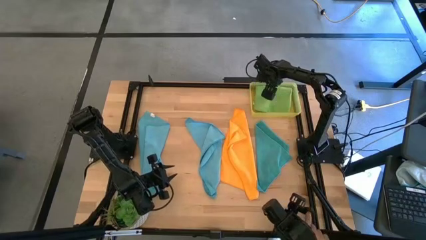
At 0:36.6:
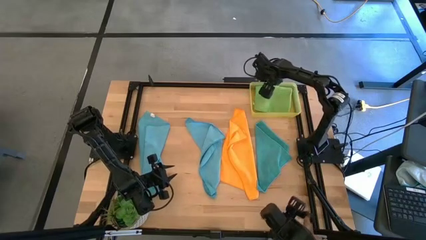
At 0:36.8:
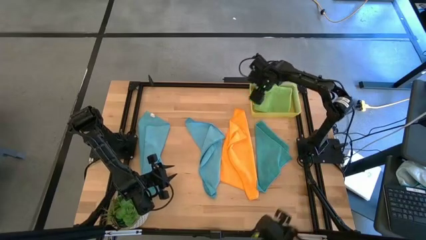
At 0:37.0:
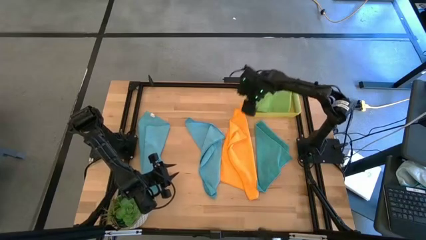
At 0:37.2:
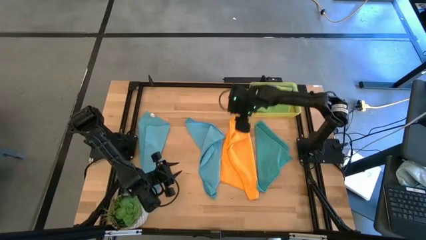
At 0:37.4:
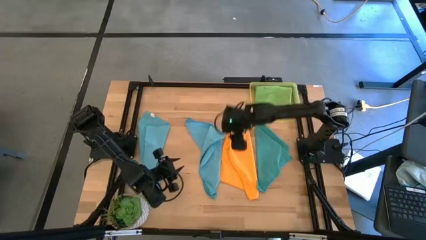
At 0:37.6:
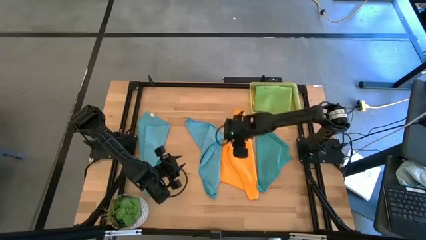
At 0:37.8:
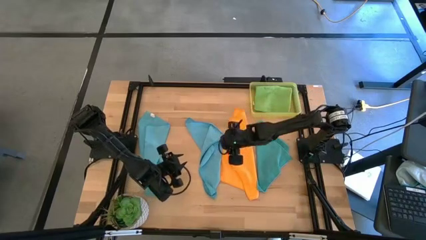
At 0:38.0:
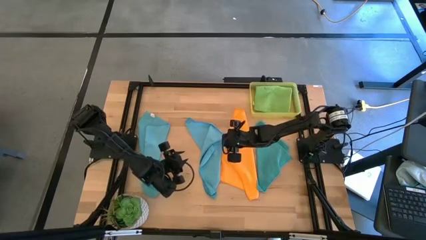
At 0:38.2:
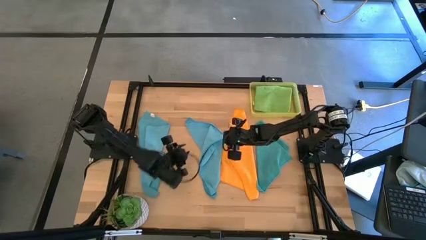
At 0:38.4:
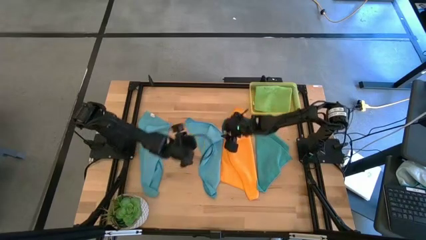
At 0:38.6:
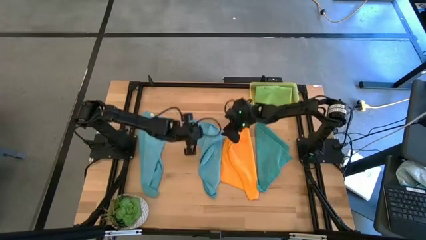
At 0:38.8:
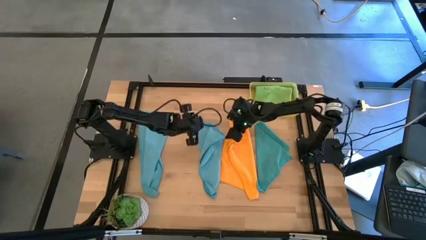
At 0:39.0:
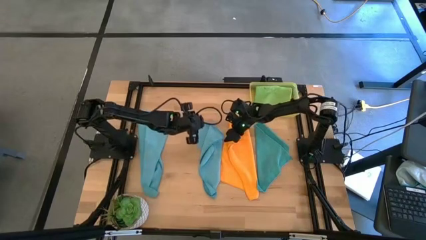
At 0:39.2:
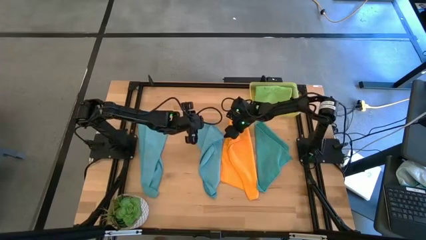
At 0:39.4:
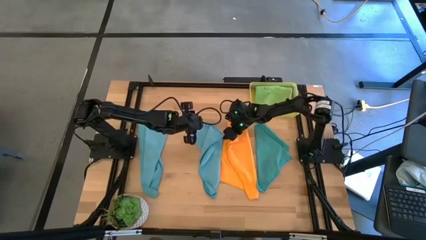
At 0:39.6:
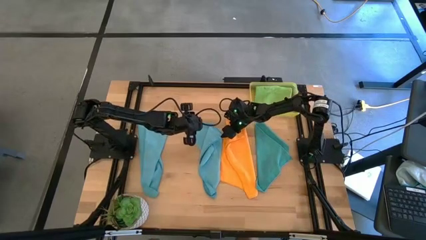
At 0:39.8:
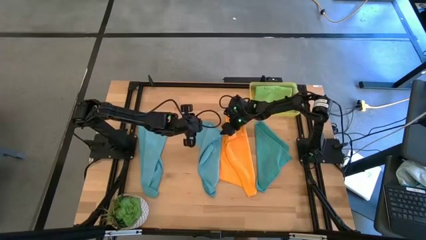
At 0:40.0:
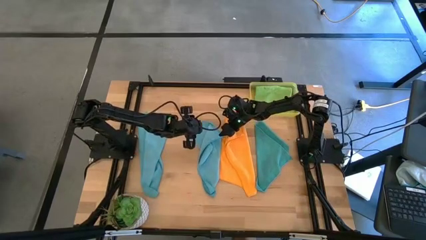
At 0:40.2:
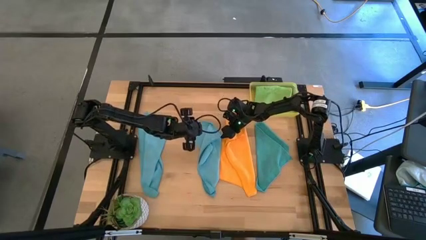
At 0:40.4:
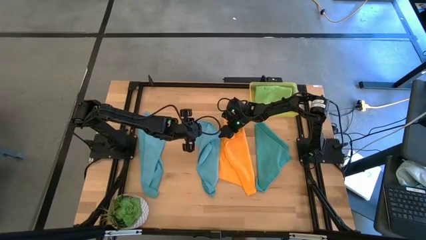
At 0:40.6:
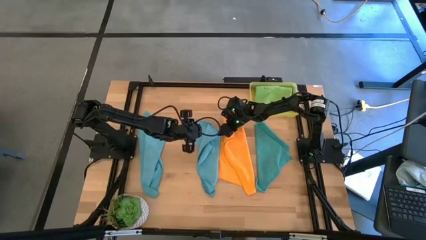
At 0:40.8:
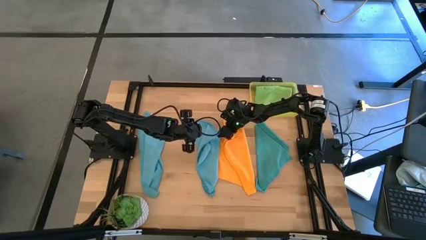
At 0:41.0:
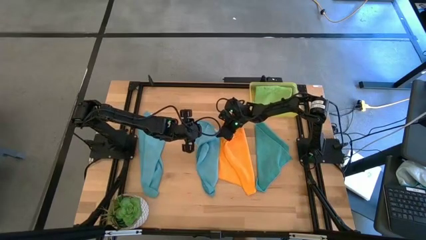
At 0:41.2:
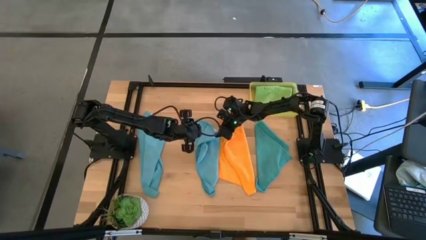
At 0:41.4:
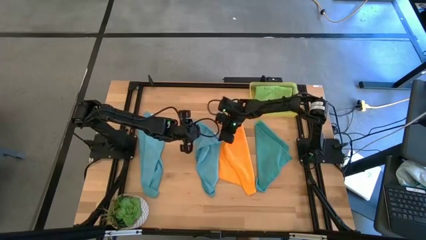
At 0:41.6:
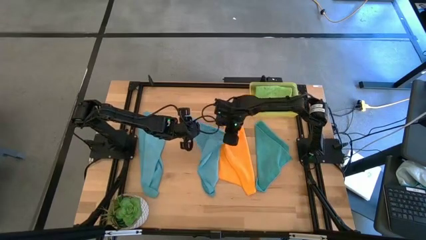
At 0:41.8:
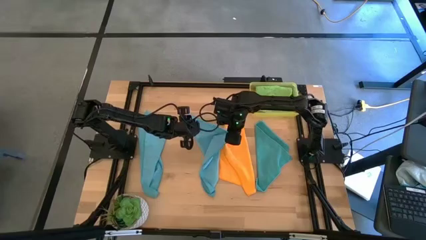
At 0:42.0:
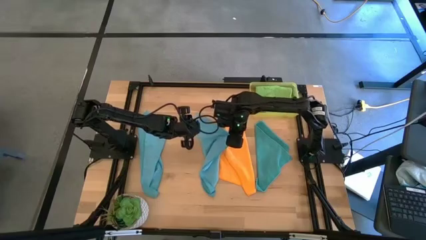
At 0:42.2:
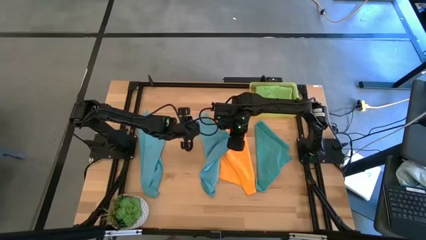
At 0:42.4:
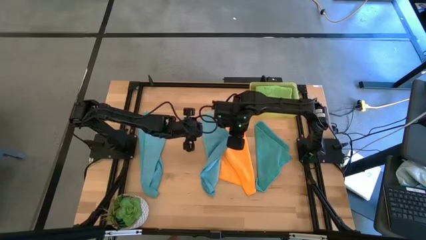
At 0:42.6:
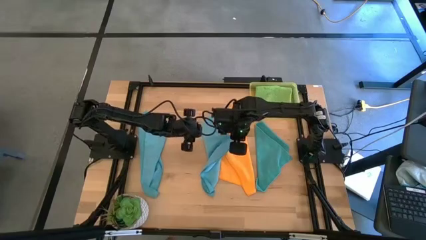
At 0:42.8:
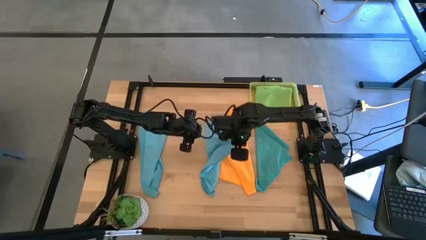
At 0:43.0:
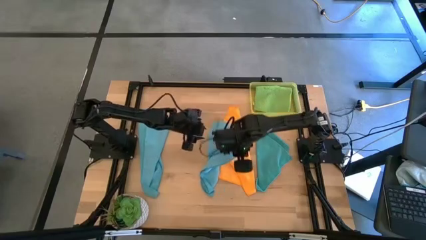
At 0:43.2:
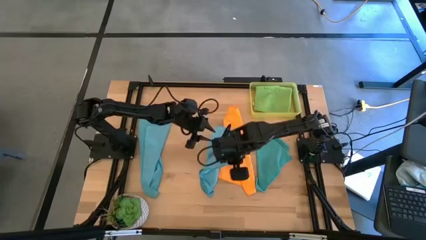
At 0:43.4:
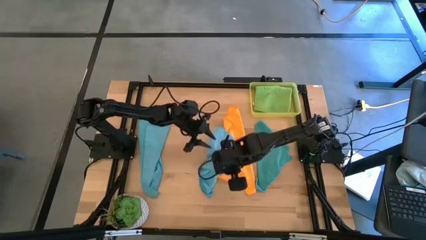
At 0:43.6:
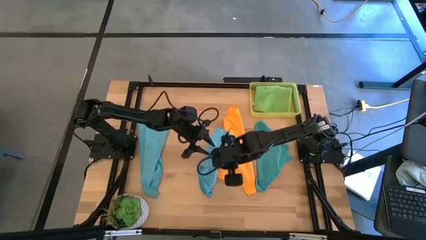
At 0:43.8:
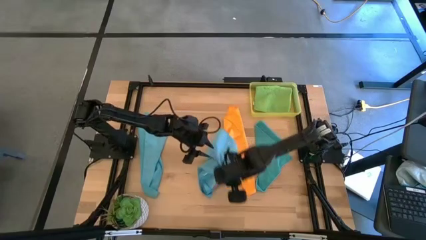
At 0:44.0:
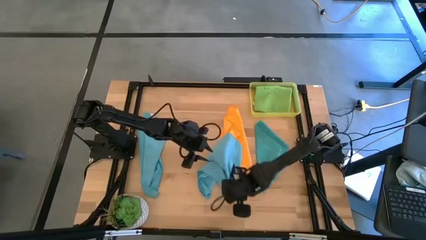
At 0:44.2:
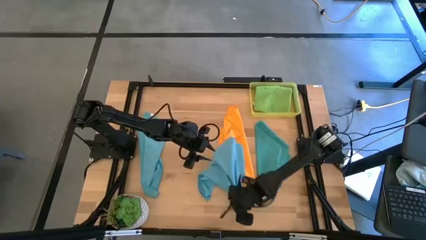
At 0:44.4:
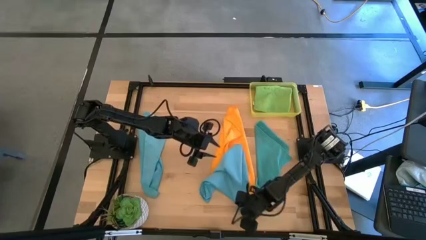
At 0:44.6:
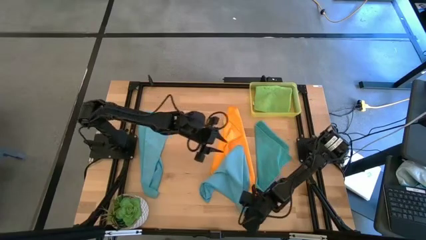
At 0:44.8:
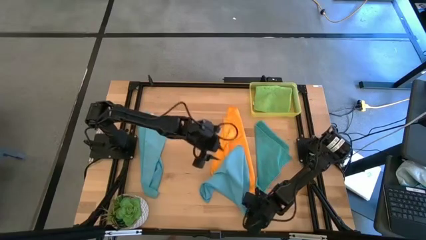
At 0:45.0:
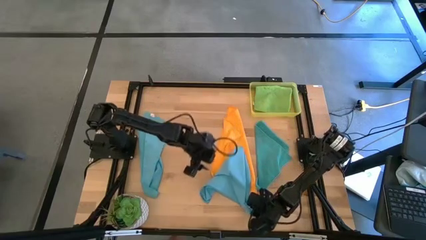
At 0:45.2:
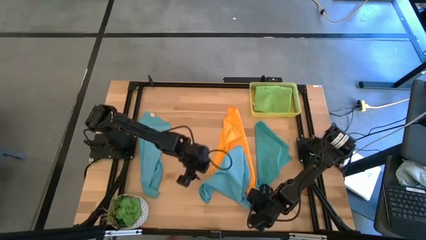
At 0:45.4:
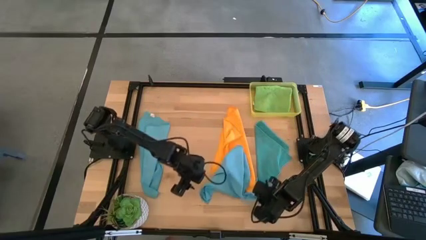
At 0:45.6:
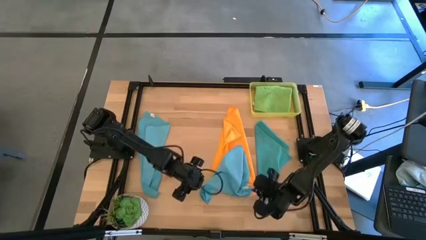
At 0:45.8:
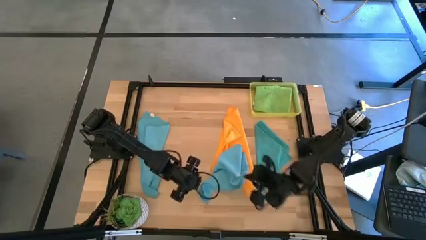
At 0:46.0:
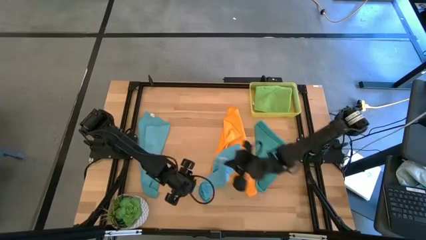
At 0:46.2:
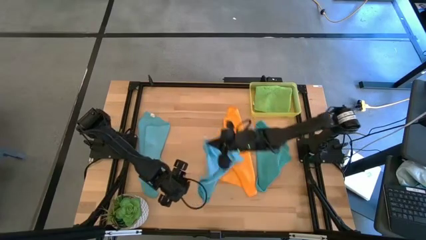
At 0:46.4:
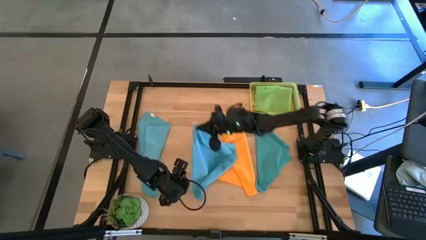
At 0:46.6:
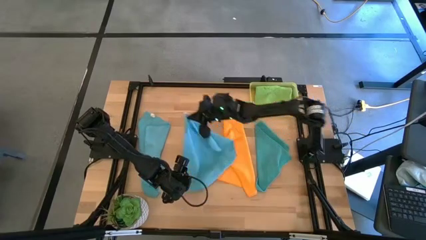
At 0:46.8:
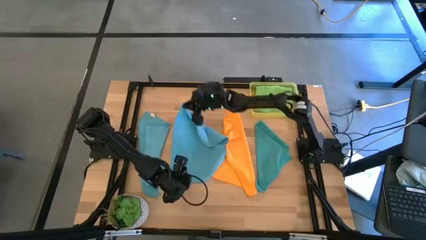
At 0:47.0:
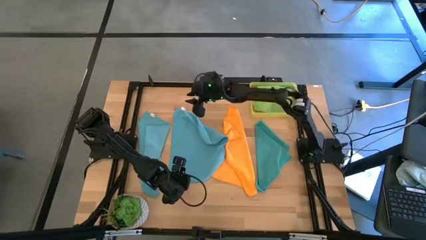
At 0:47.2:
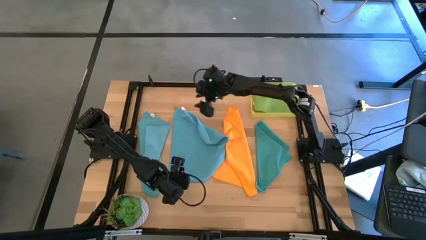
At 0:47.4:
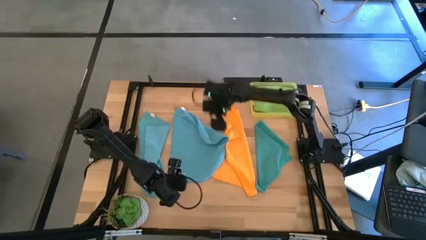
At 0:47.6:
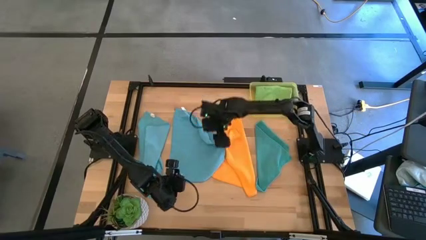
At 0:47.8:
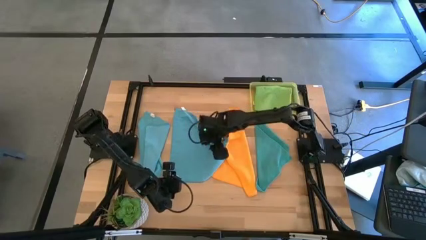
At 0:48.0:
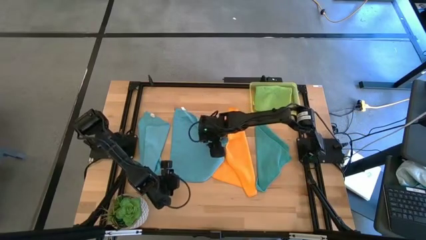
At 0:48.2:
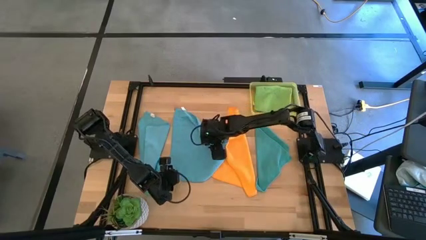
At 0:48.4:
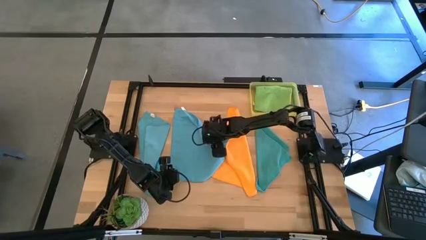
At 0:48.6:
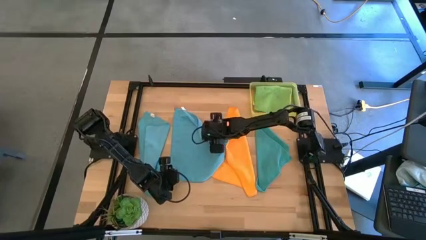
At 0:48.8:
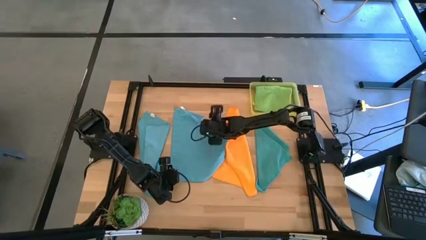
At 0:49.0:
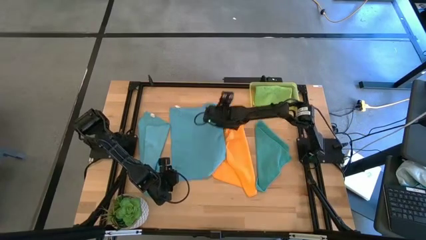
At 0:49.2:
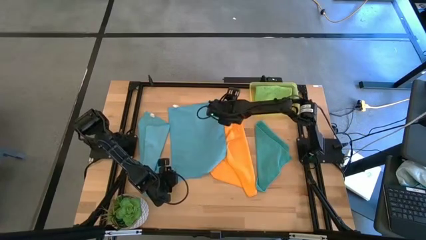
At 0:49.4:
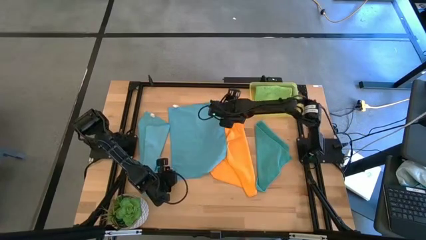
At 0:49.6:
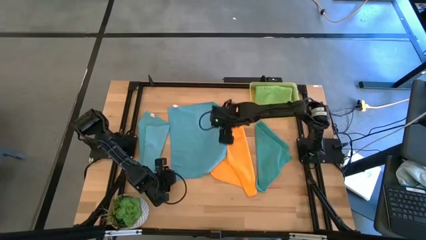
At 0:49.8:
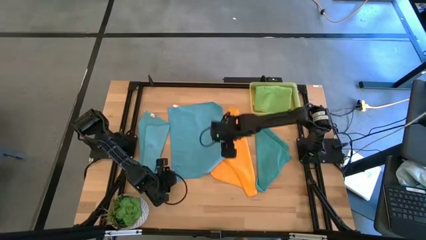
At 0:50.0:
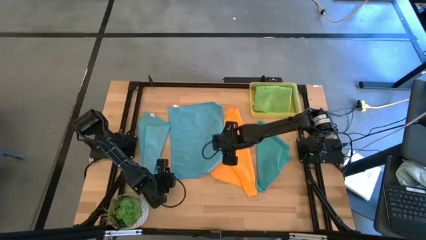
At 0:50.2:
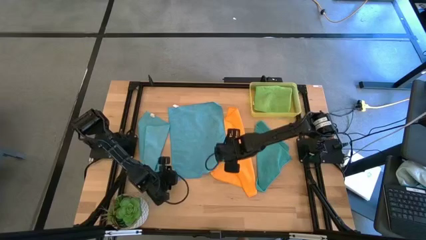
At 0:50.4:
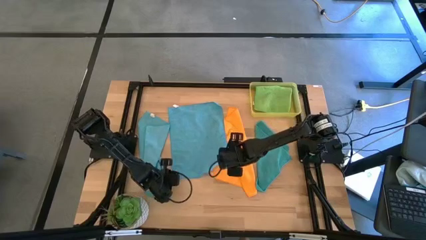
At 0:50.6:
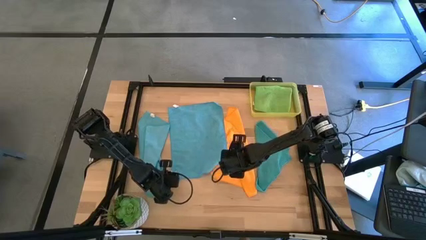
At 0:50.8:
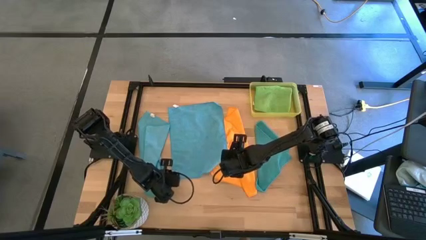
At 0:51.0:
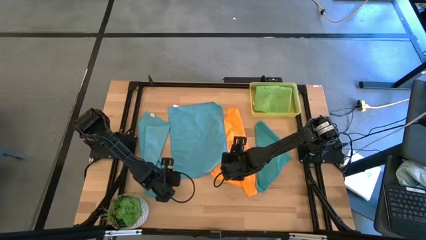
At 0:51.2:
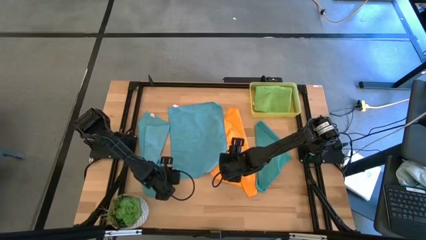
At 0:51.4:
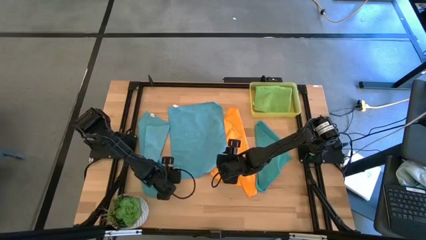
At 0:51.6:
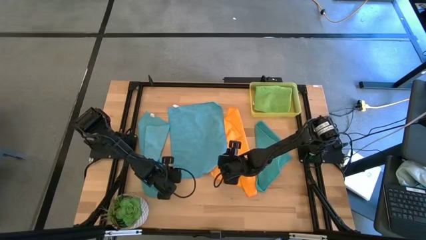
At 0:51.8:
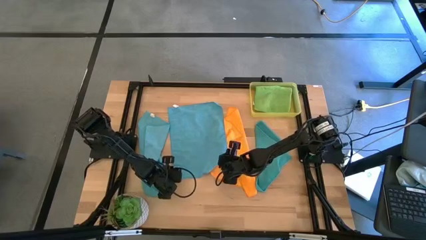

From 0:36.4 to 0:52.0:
Task: Fold microfiber towels
Fold the middle blue microfiber cloth
